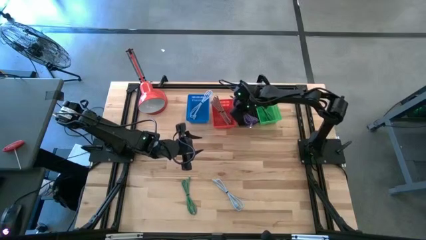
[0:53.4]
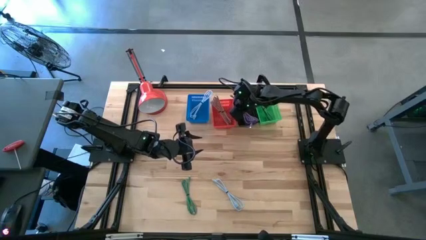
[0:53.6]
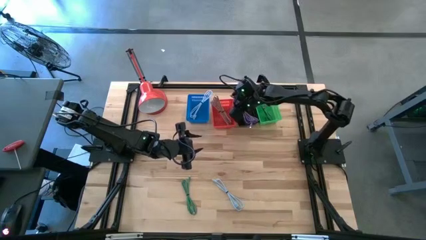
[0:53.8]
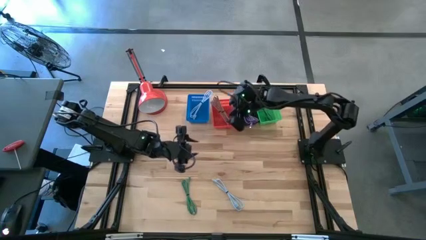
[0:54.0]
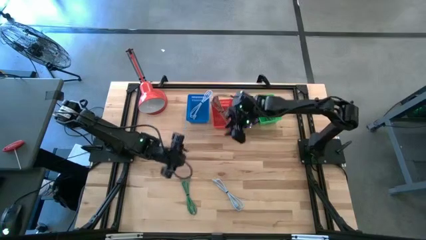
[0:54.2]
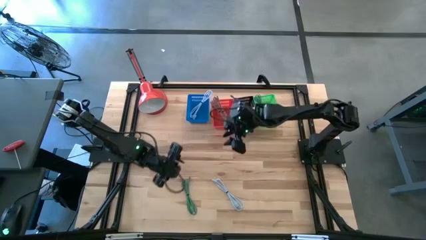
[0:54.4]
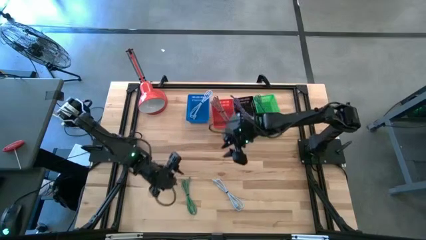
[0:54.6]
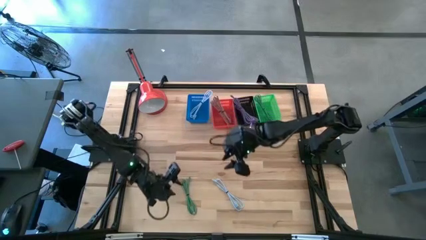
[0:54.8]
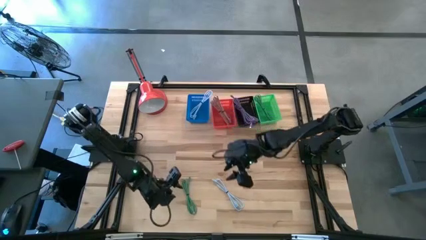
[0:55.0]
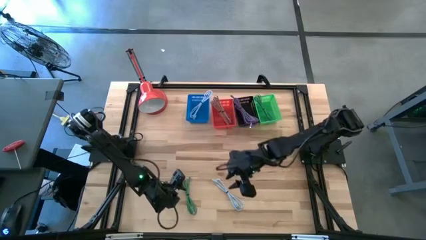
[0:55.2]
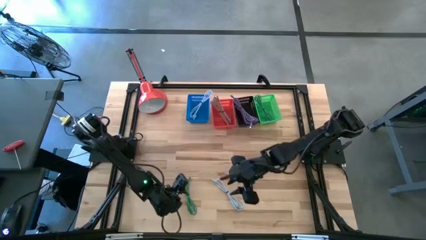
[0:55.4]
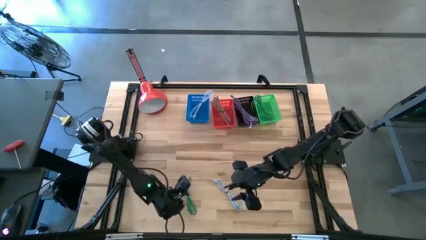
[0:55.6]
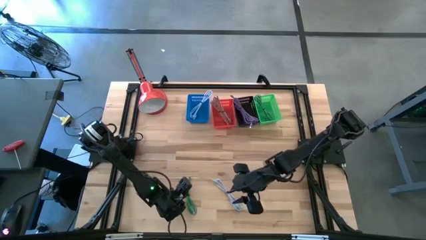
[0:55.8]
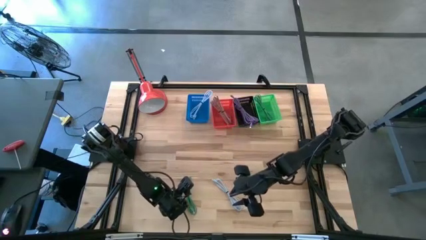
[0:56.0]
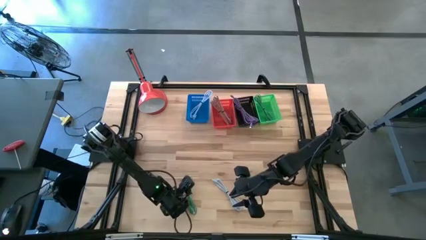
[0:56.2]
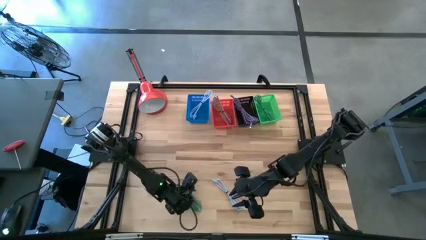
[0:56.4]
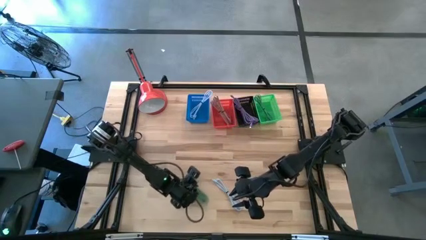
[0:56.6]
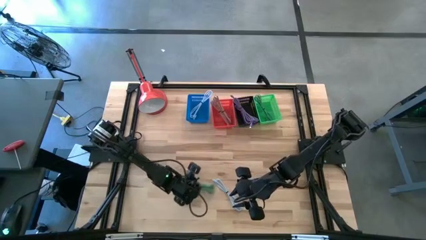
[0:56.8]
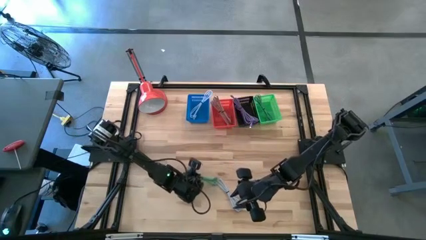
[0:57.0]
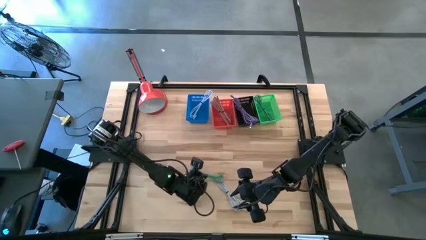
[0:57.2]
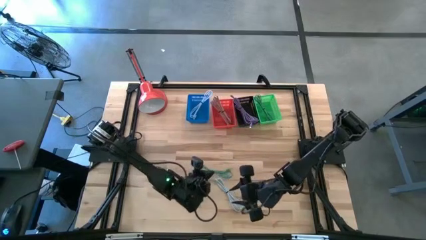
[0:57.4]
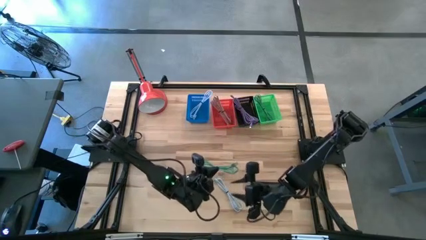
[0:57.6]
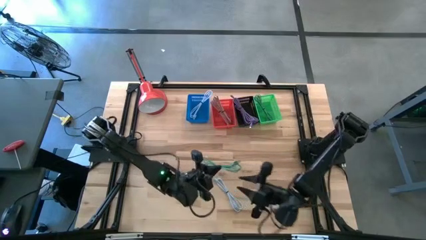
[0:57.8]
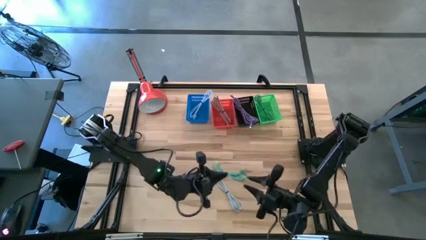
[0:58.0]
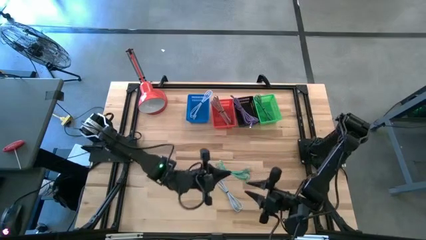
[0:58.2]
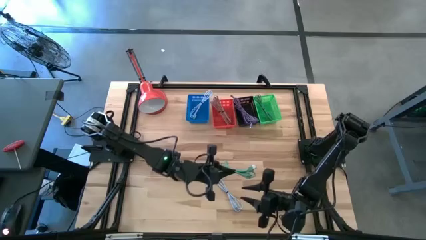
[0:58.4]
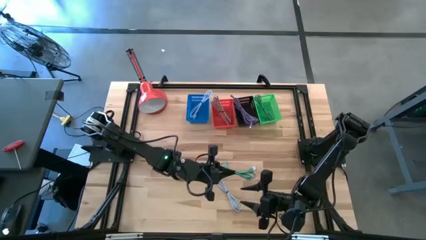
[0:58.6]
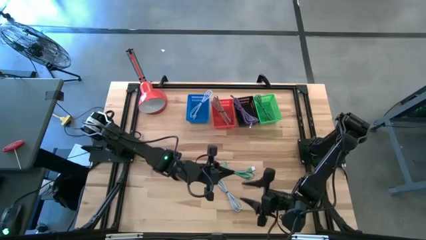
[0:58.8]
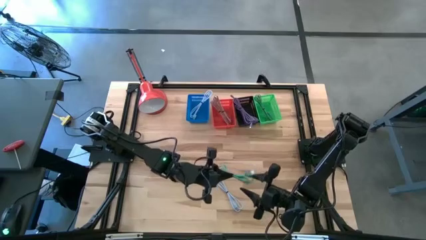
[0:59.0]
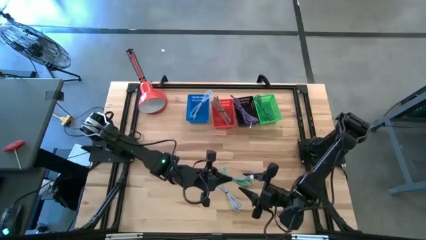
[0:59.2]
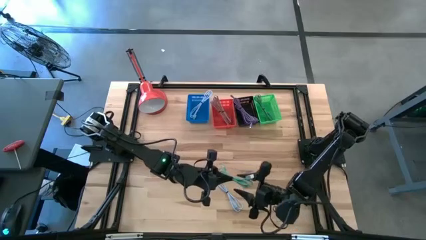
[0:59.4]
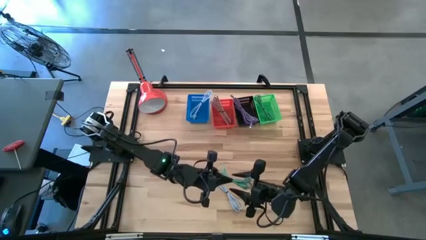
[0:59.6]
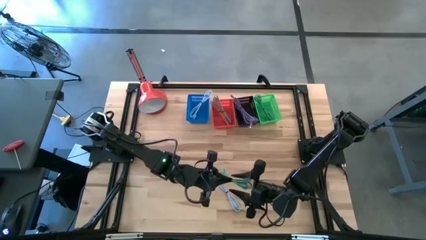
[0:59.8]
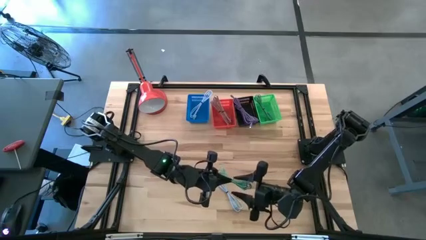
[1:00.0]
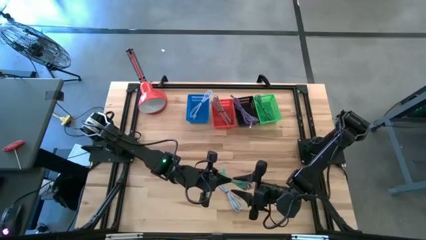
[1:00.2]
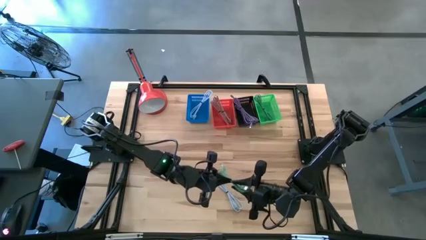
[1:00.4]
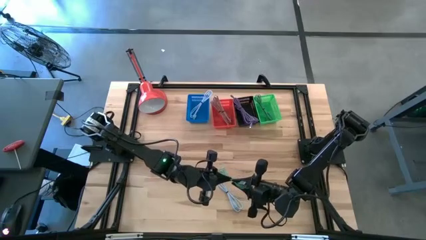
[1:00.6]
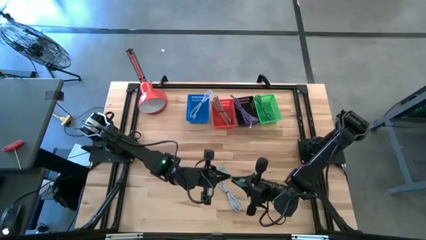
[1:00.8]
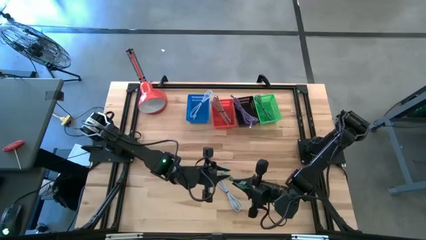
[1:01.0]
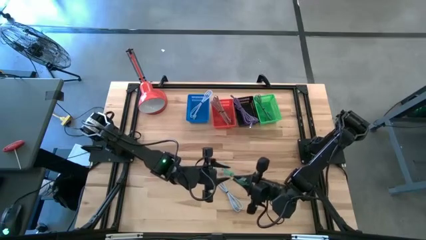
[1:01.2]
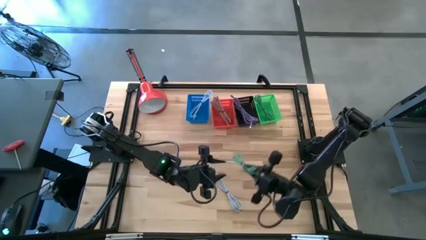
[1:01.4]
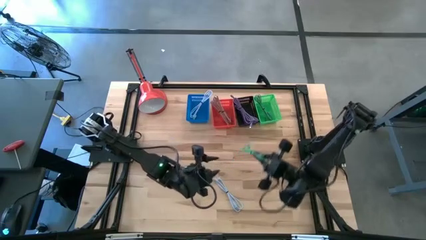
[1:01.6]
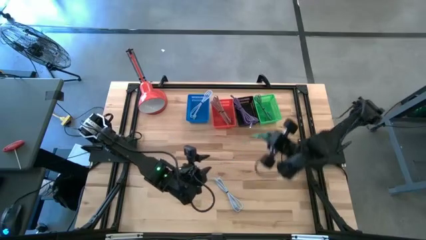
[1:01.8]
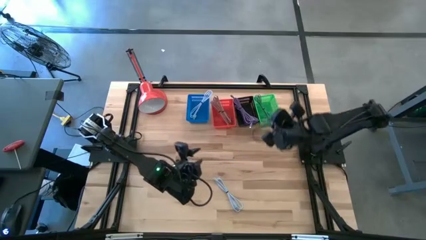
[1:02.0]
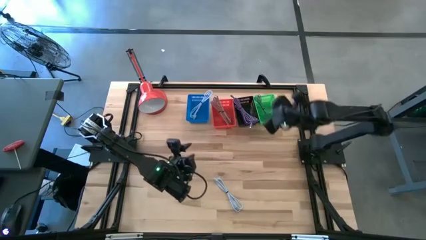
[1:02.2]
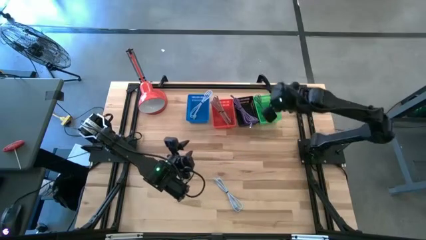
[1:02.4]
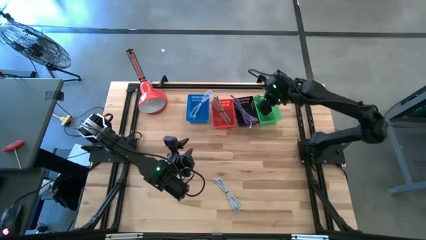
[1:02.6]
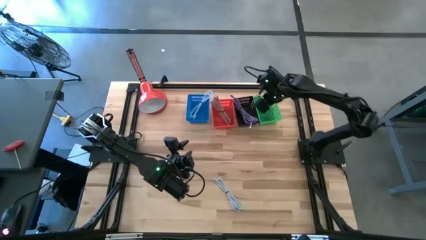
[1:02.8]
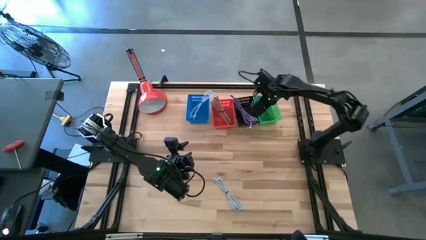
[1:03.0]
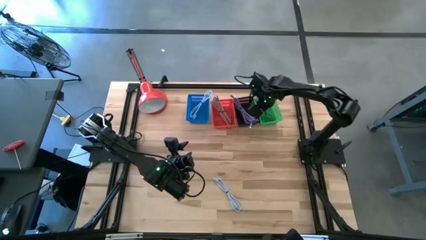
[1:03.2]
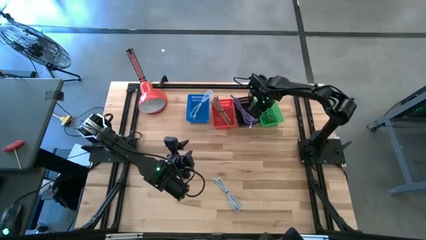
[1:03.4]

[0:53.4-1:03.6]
Task: Pick & Place USB Port
Put the green charger cable into the green bin
